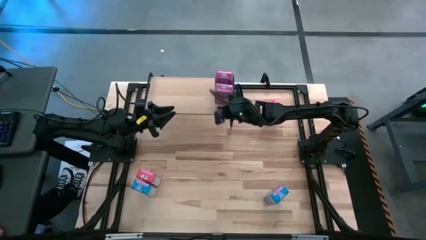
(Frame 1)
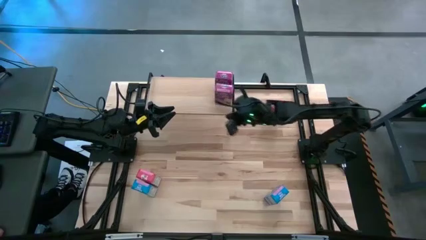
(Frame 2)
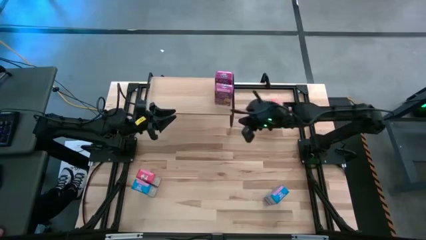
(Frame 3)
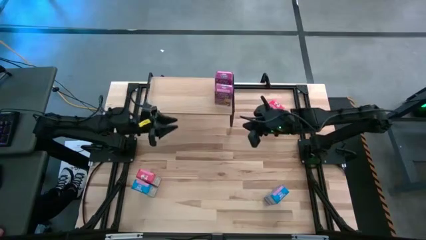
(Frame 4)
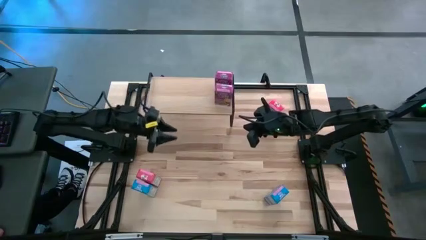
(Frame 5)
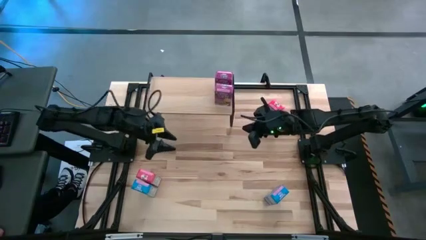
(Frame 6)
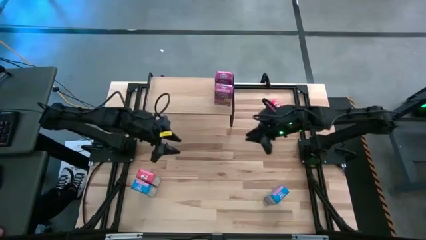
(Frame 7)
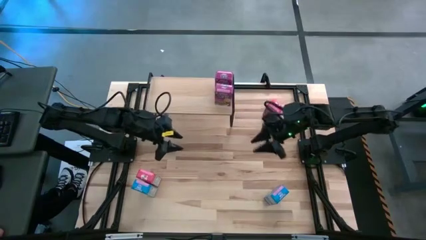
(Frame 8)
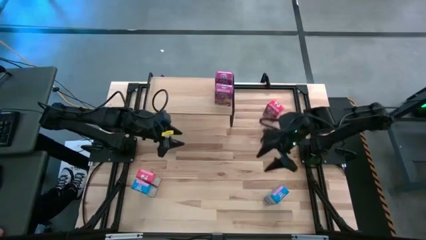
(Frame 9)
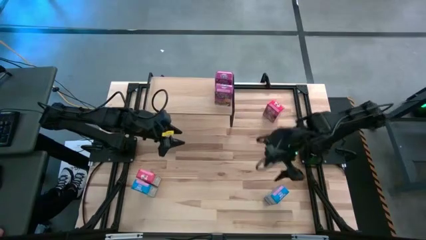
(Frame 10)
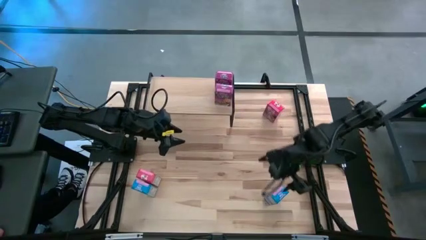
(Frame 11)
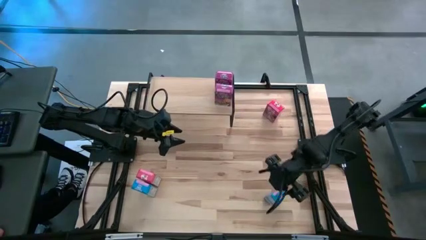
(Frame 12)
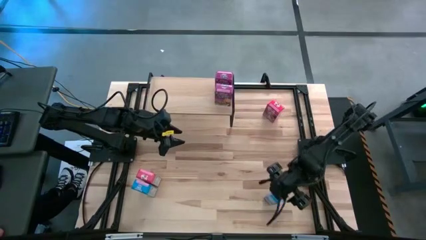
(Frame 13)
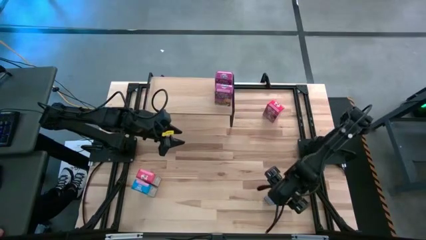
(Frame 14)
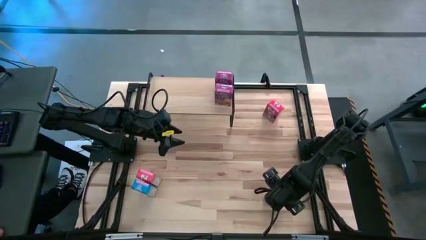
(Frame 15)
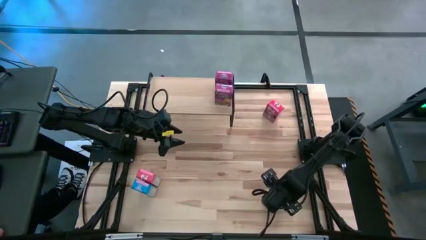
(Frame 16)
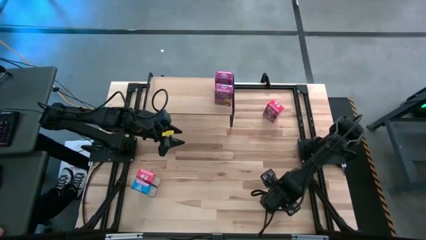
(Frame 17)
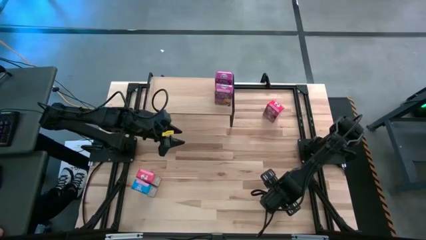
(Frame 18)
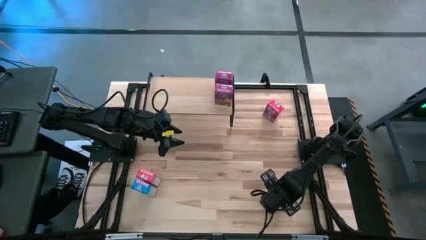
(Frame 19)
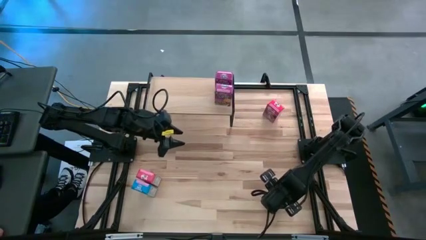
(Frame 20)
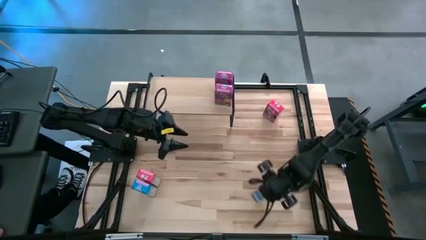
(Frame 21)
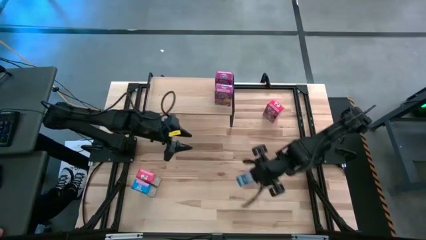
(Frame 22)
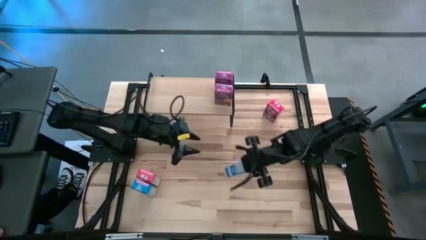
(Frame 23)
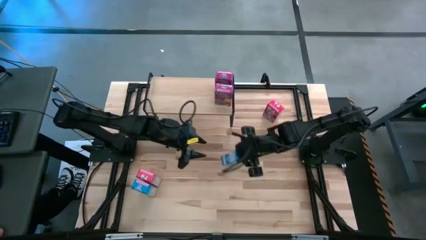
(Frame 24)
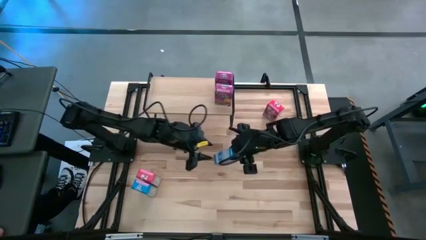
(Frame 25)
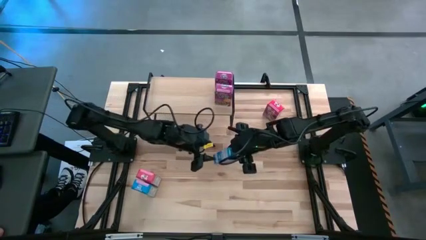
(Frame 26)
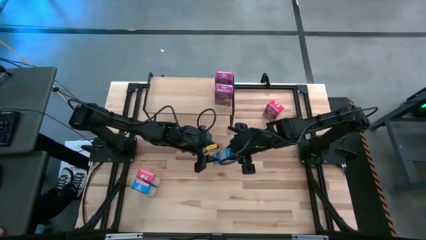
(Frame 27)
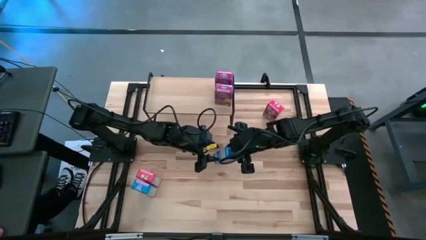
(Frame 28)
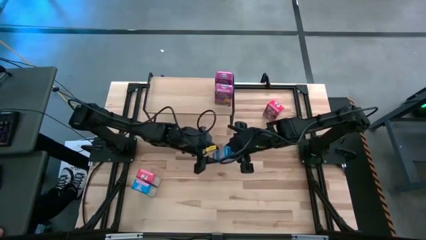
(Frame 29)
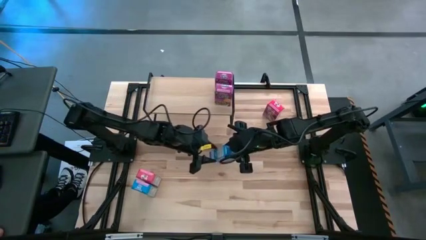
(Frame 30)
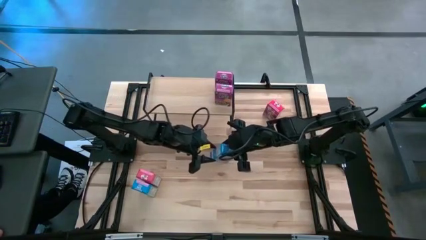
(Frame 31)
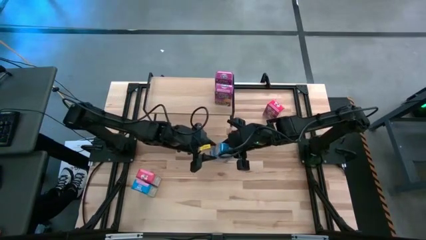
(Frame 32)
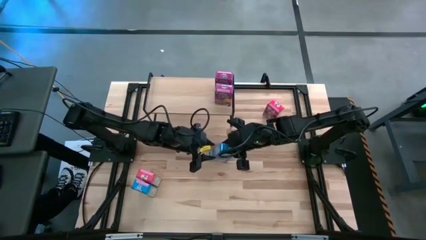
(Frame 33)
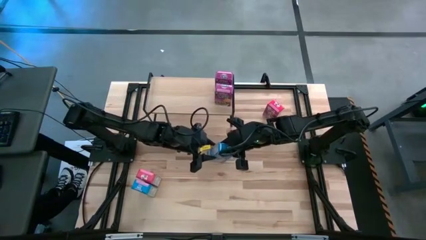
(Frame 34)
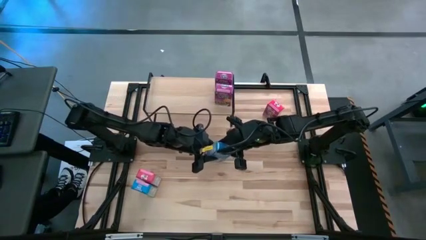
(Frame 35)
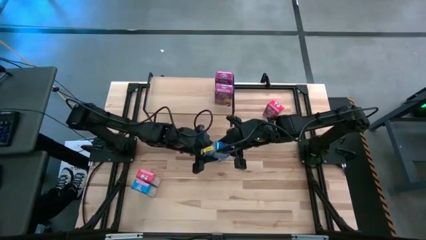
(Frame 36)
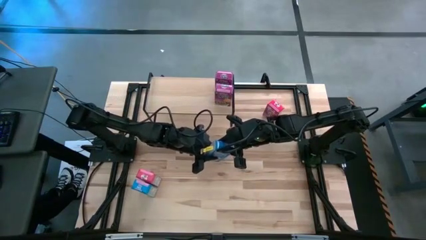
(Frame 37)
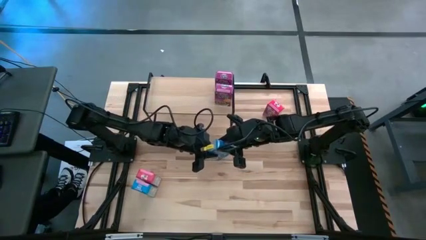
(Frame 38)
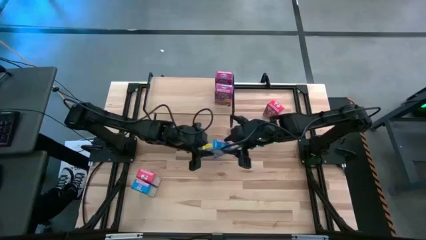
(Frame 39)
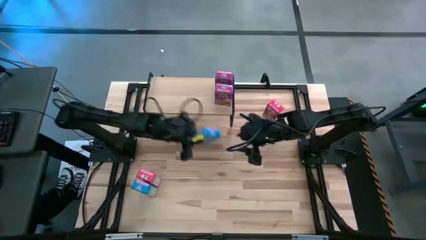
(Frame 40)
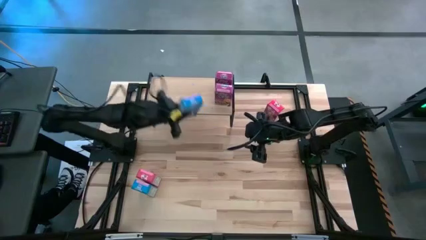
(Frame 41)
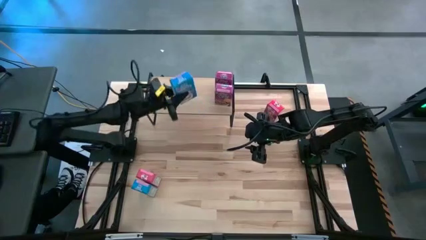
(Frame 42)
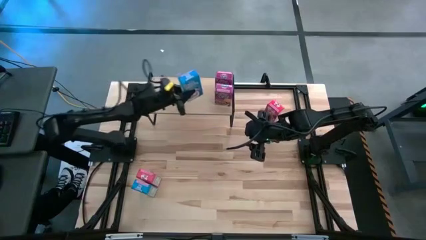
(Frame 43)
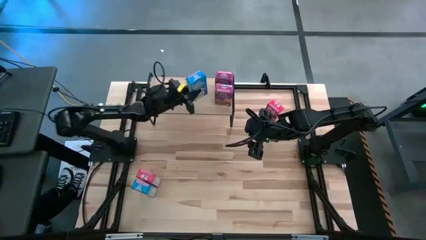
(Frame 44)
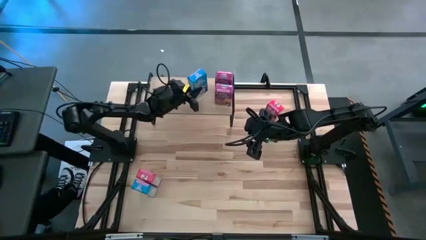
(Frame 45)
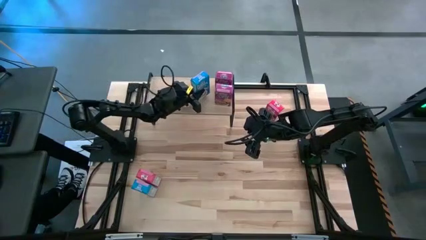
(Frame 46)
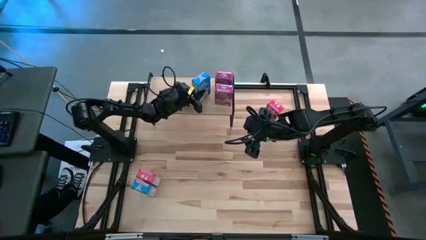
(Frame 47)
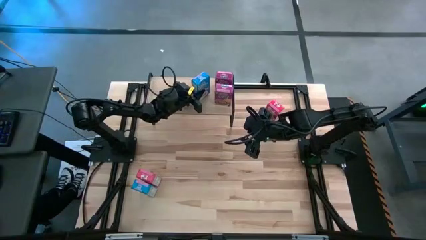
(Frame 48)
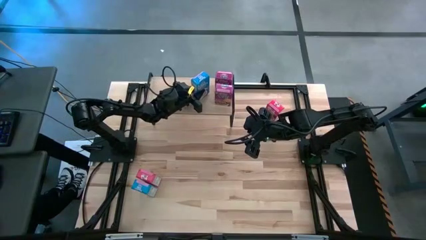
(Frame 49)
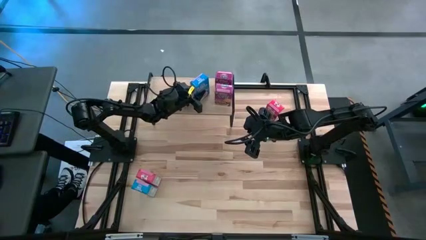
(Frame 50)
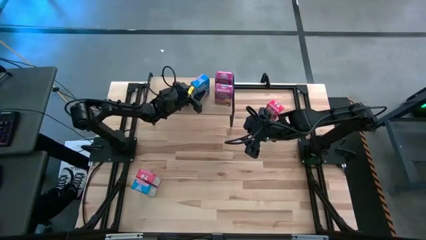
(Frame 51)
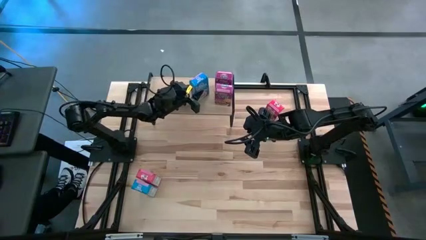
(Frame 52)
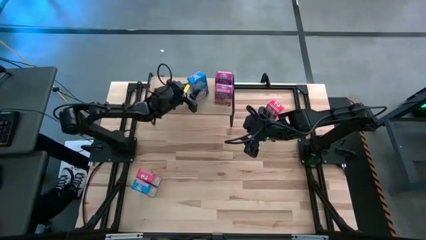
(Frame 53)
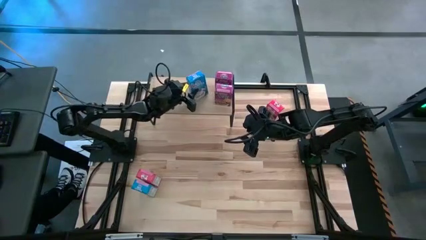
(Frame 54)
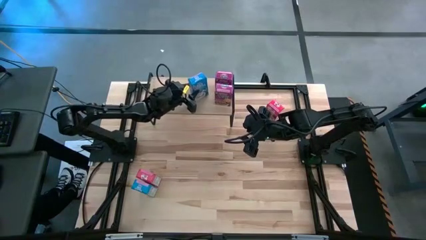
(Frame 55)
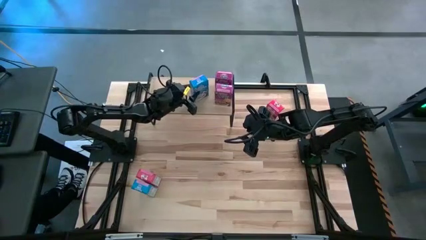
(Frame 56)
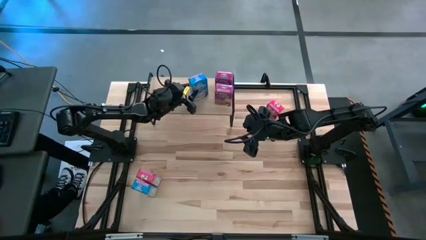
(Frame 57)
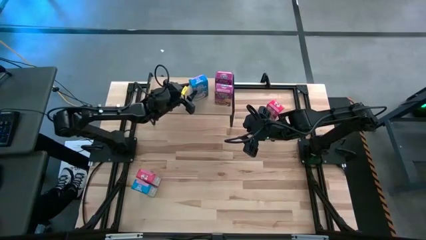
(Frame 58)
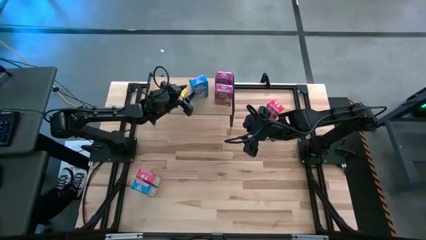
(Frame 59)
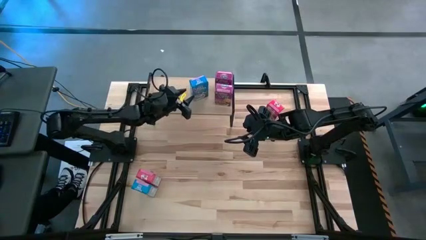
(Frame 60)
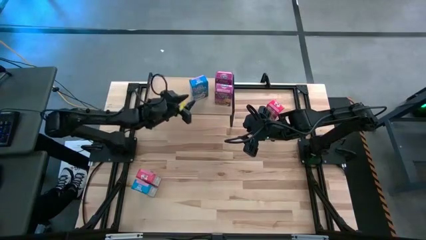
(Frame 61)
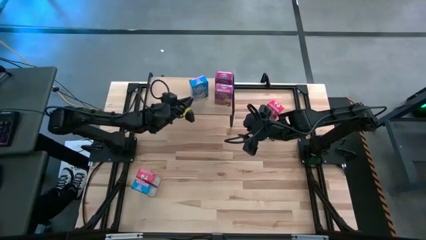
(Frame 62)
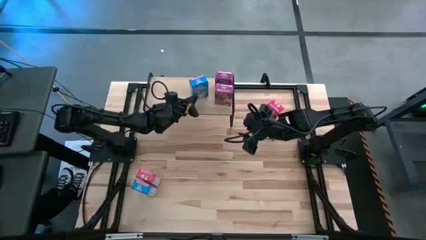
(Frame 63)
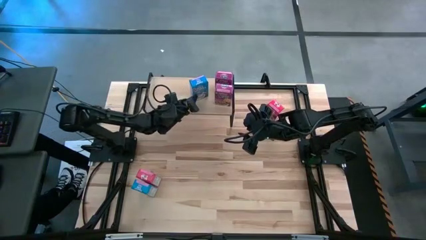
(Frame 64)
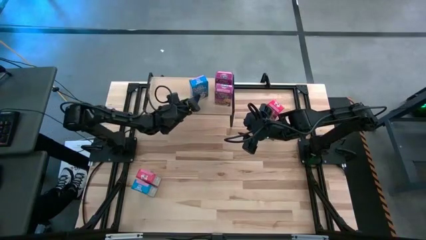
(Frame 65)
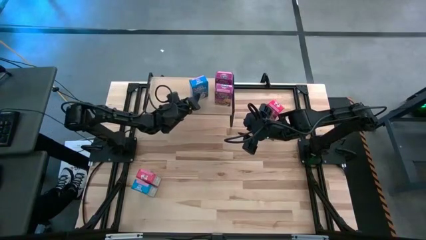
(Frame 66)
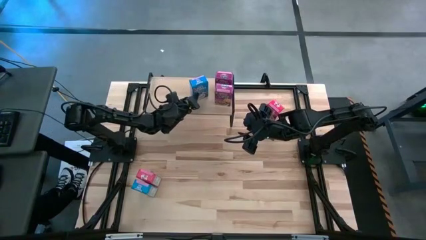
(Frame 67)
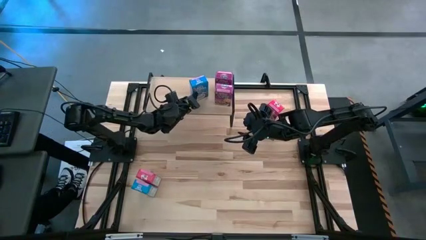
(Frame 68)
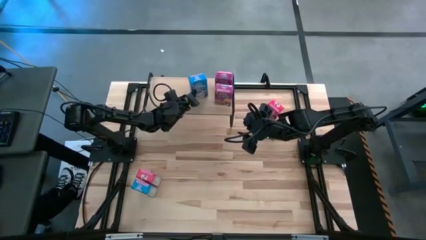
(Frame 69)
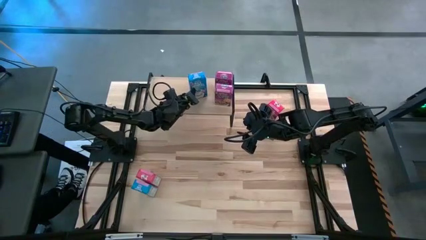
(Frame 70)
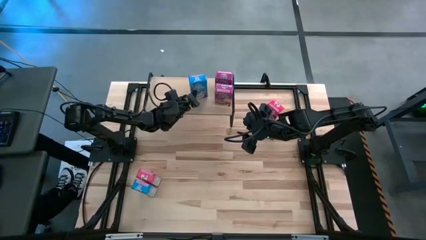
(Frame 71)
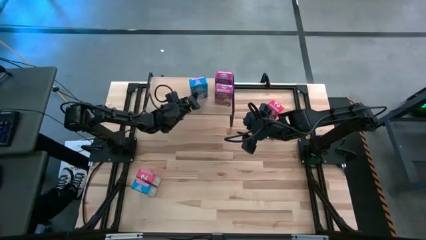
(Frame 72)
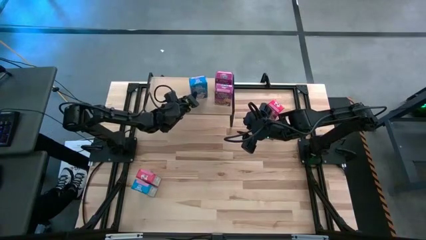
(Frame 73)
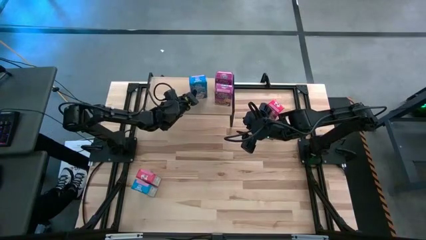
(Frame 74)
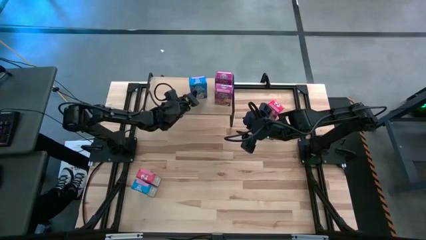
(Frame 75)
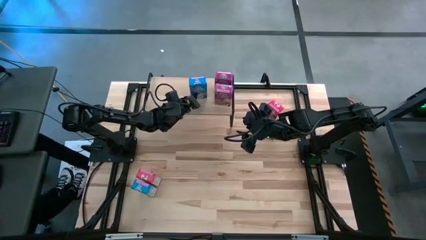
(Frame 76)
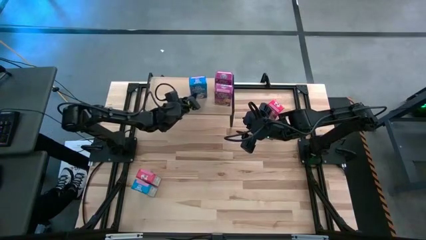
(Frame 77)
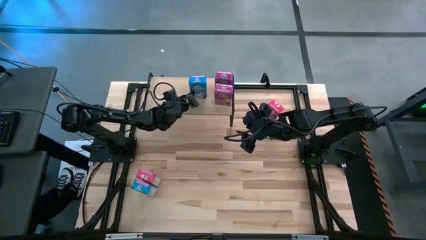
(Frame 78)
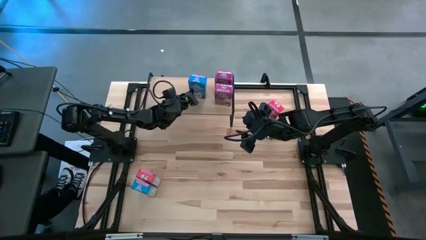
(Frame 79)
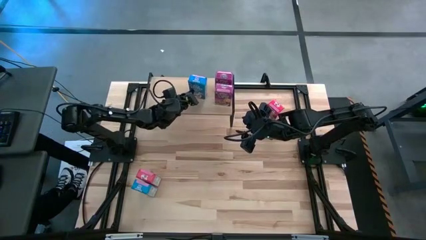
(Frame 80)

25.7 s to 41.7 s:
Task: Stack cereal on shelf
Put the right blue cereal box on the shelf
